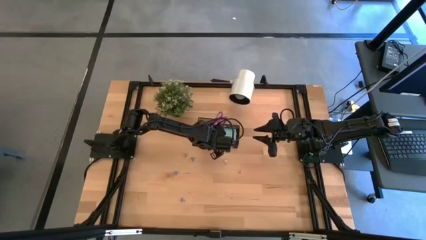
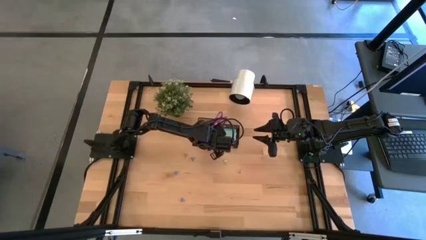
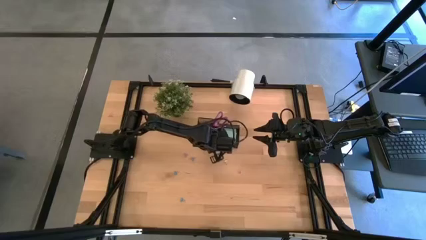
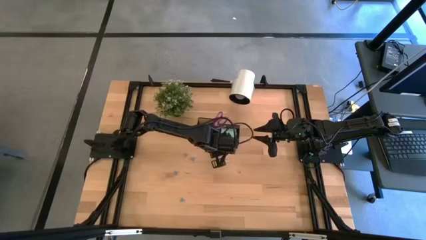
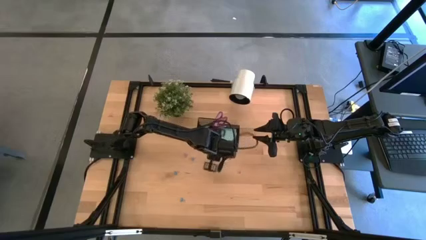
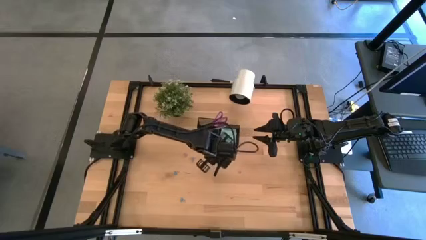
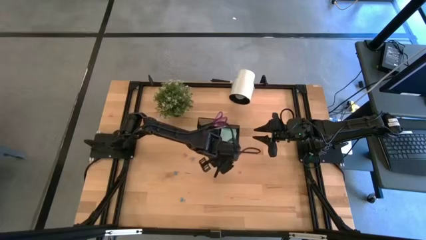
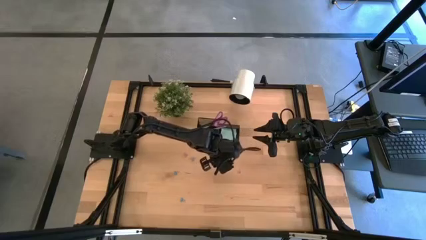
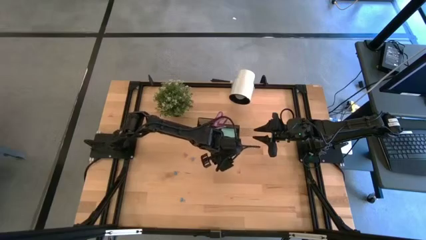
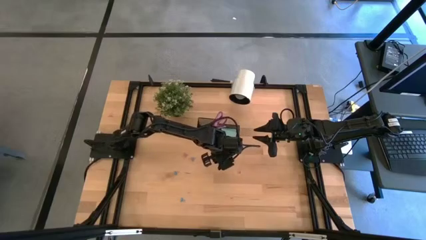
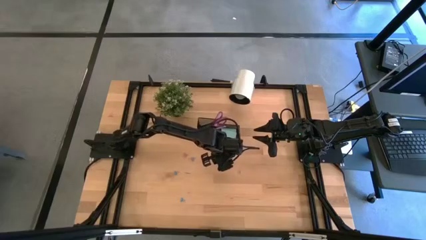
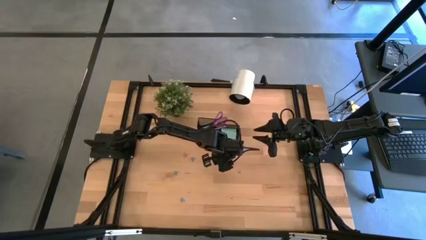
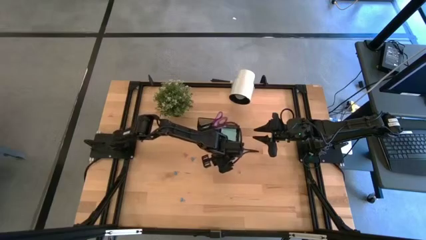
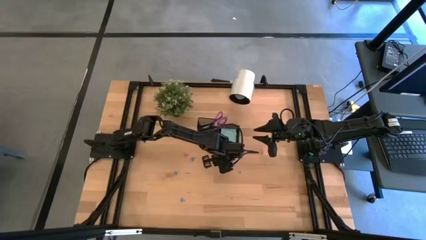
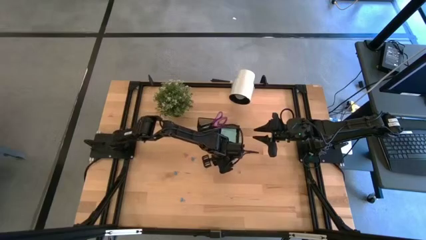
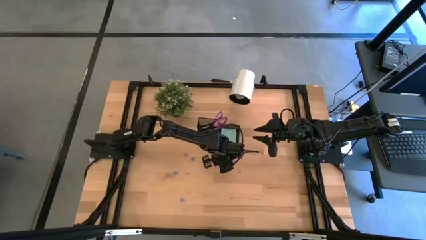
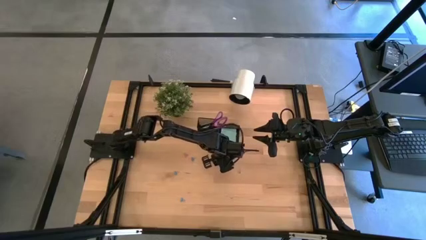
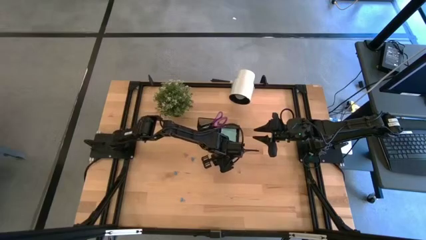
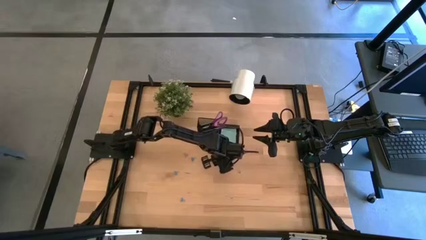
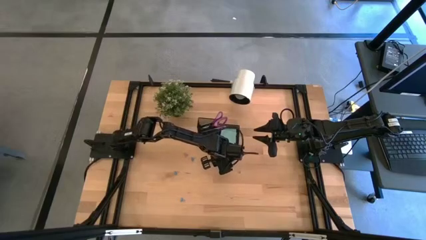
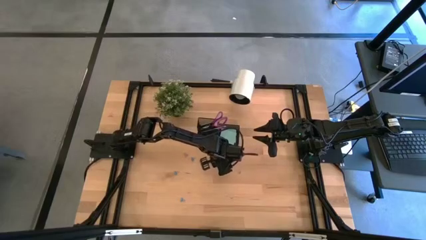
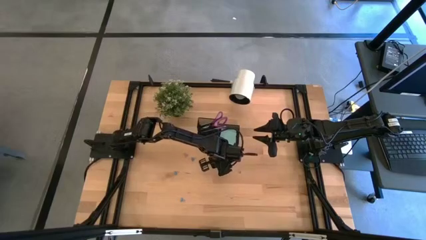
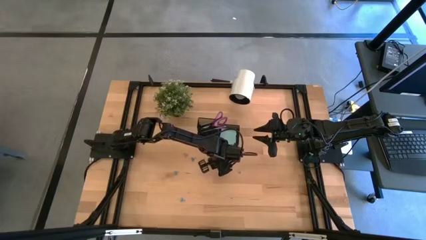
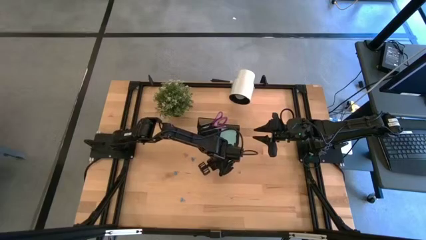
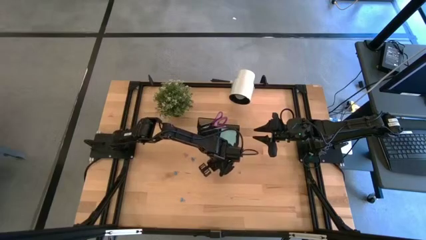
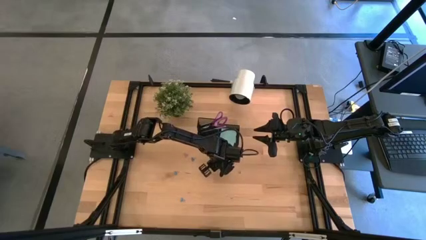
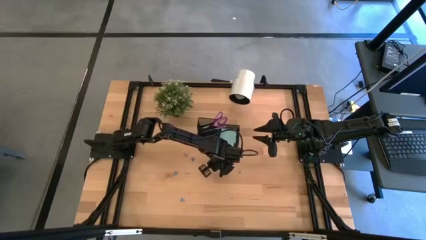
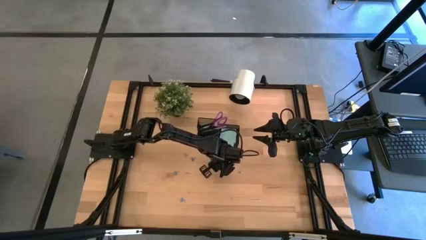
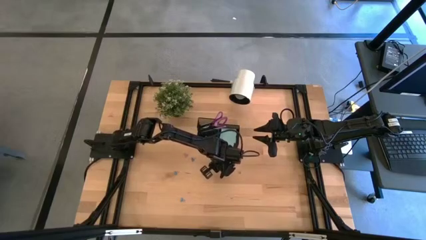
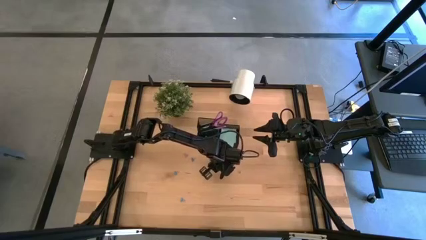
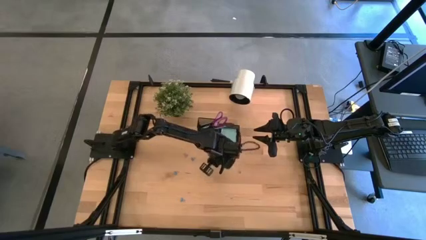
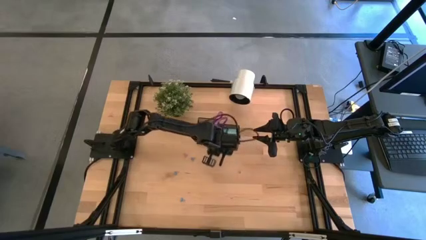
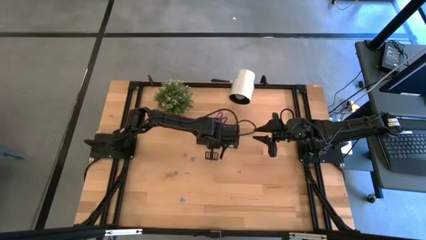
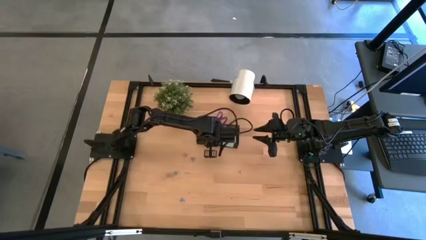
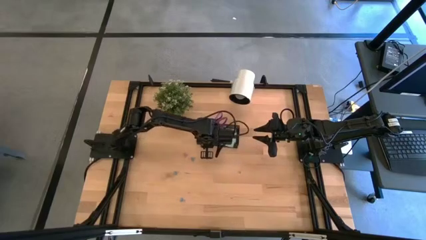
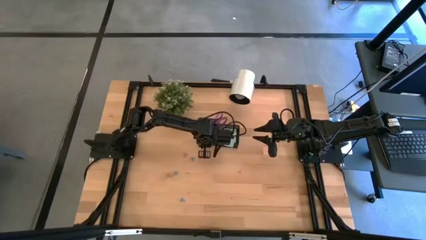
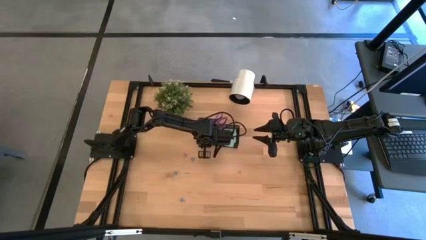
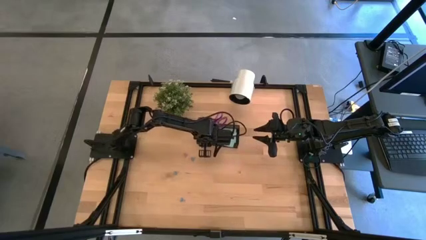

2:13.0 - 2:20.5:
Task: Pick and place office supplies into organizer
Put the yellow binder clip into the black desk organizer

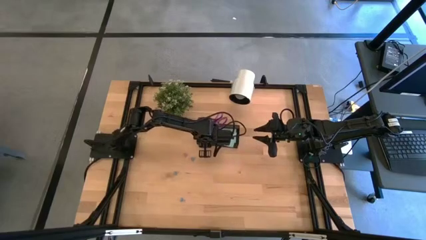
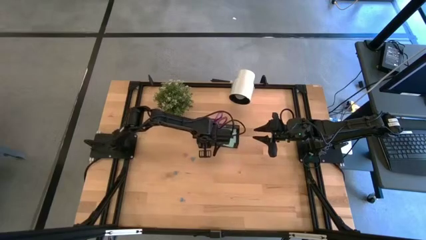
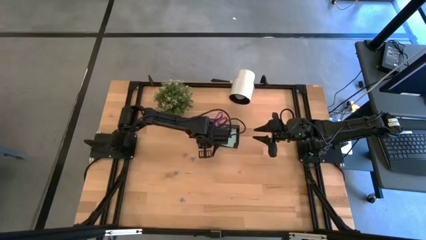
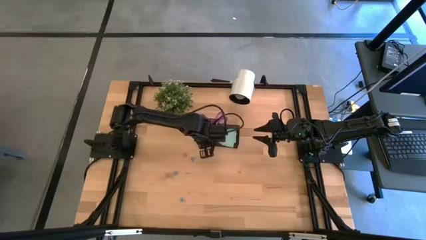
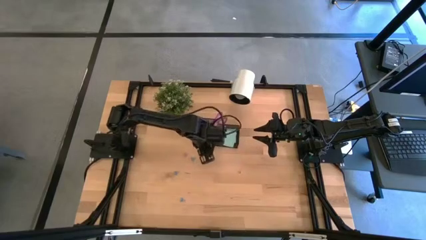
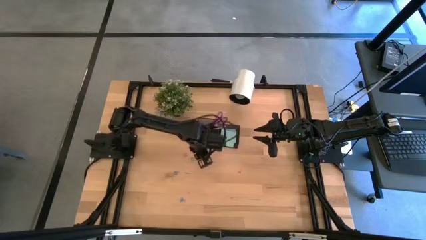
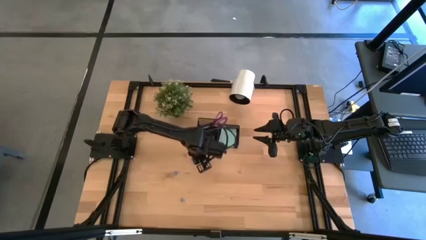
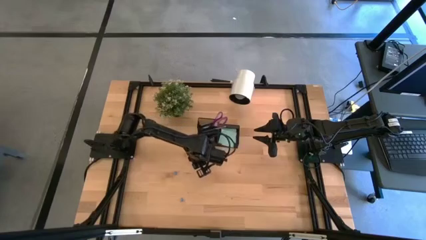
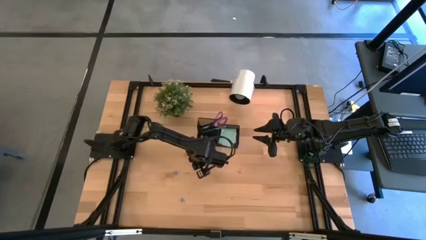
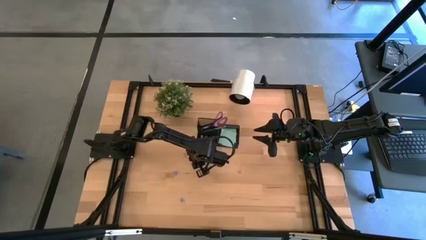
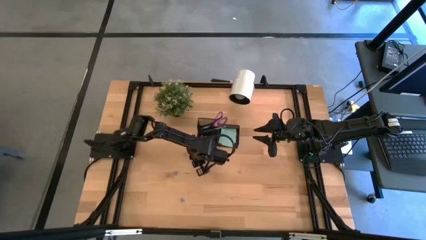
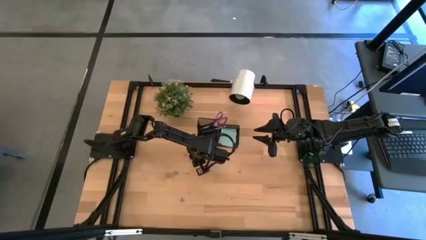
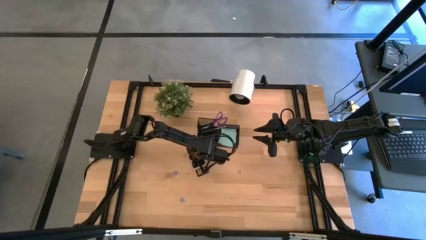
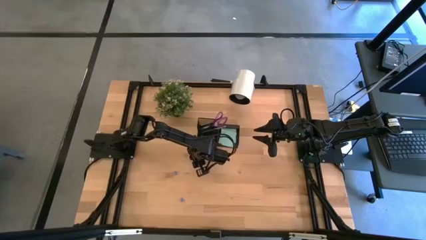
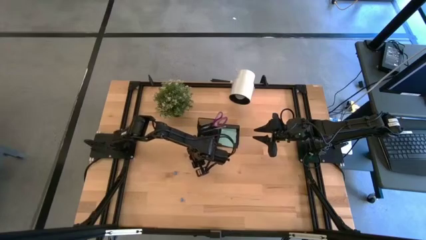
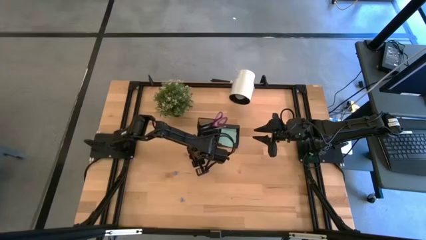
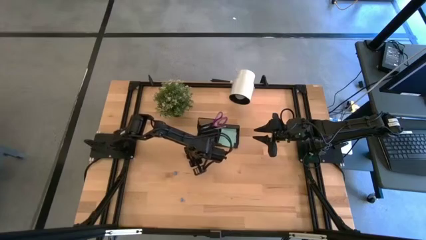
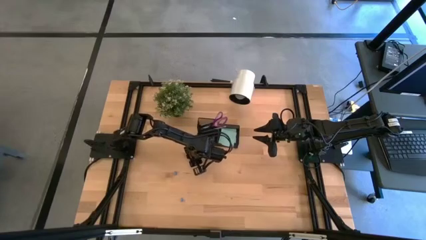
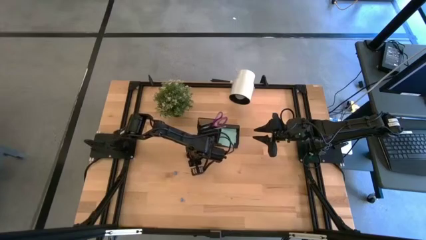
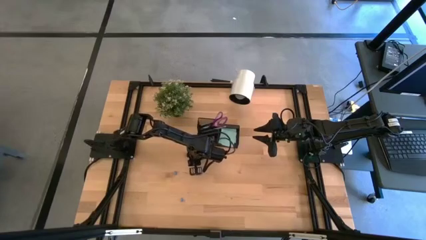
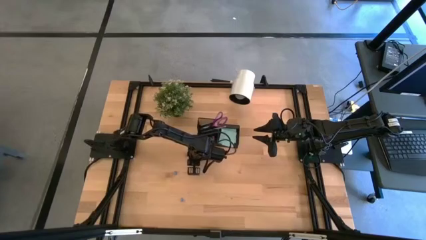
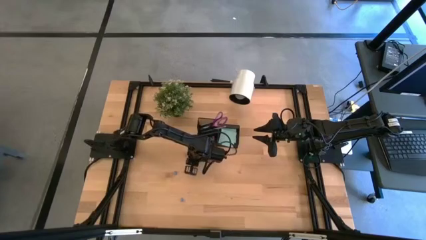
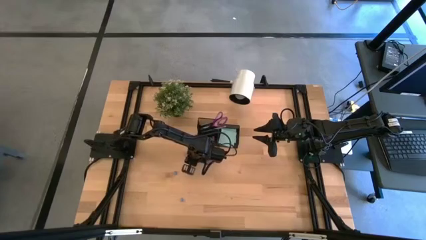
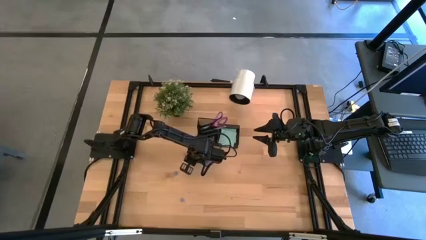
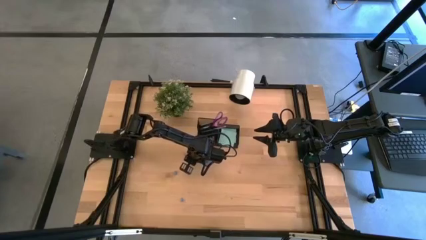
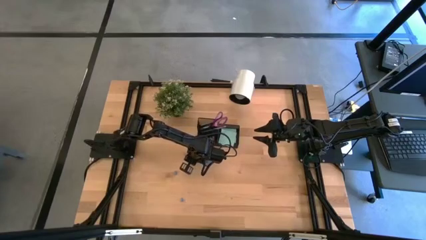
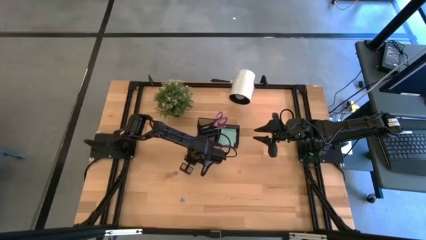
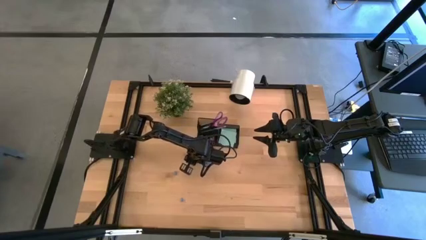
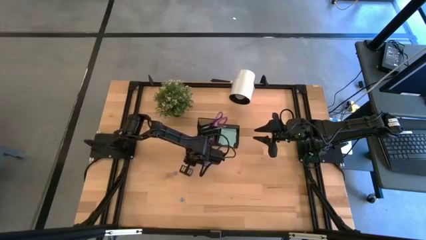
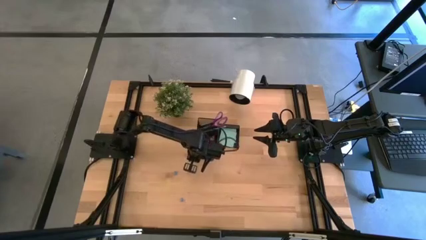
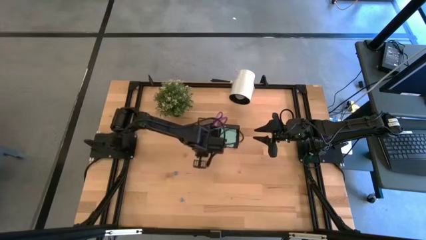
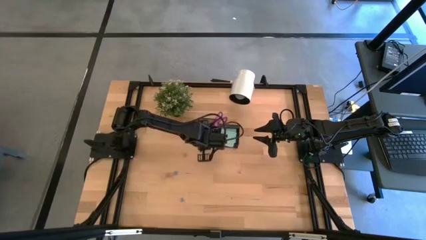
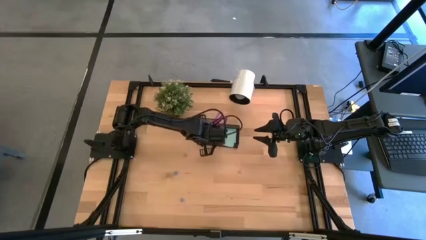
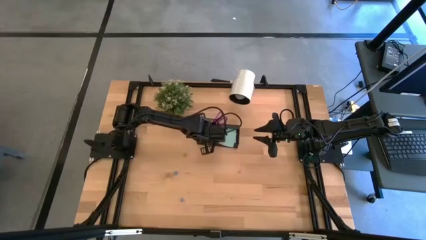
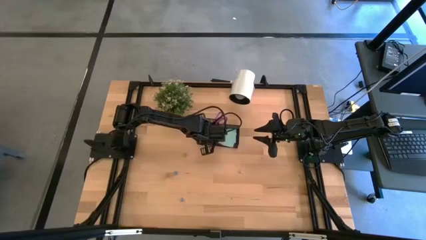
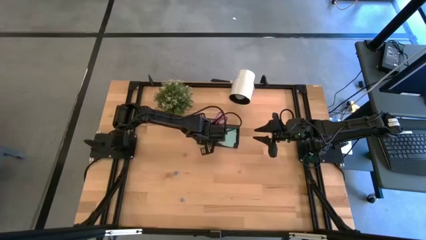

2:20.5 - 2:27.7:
Put the blue binder clip into the black desk organizer
